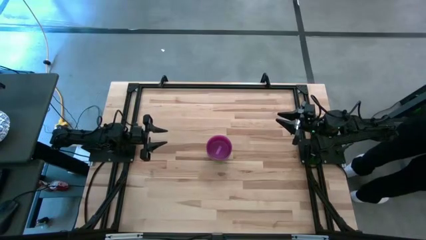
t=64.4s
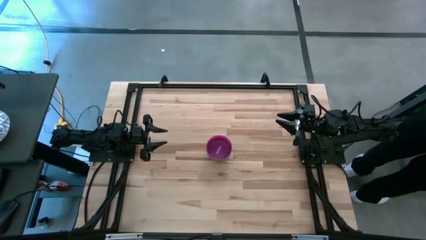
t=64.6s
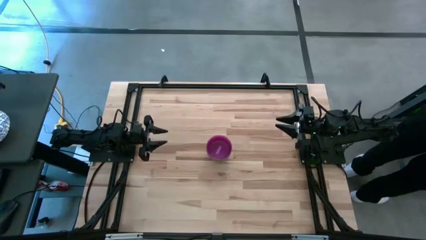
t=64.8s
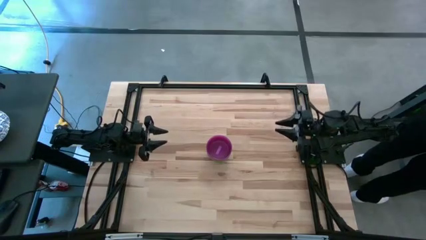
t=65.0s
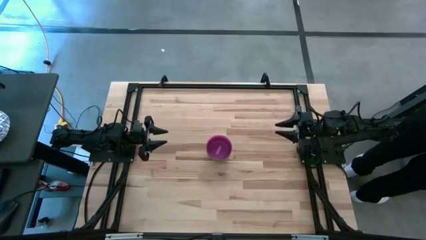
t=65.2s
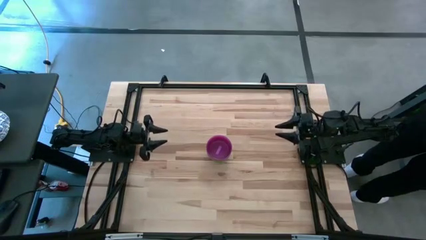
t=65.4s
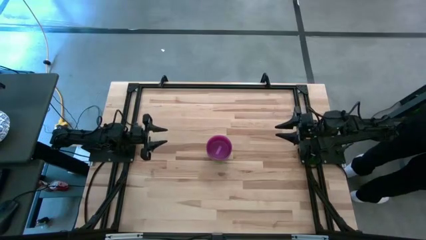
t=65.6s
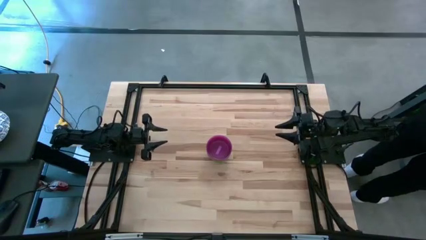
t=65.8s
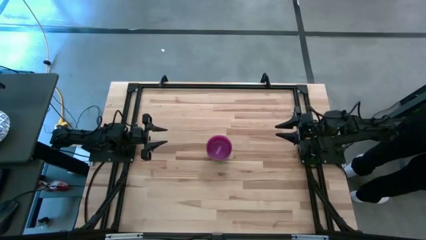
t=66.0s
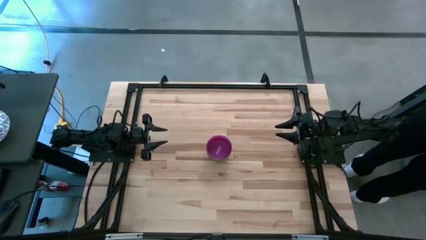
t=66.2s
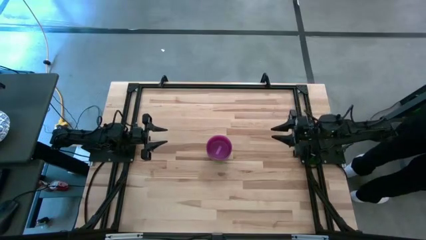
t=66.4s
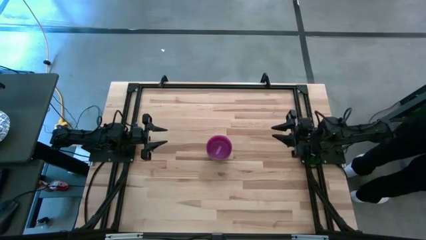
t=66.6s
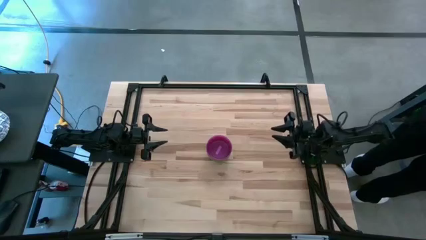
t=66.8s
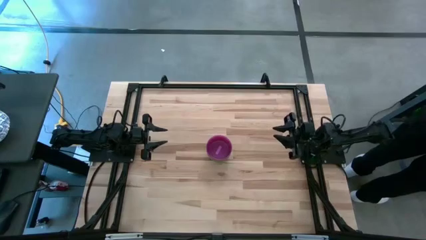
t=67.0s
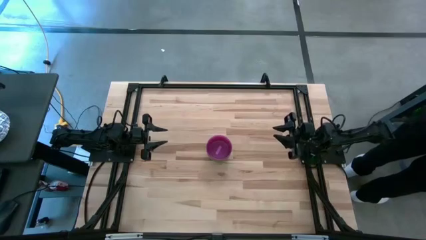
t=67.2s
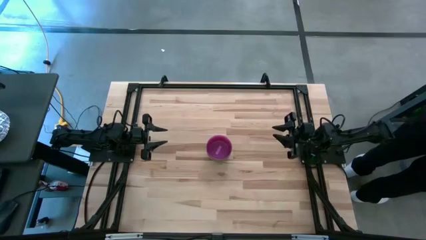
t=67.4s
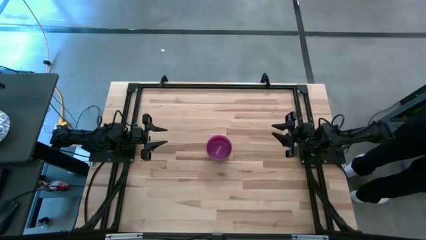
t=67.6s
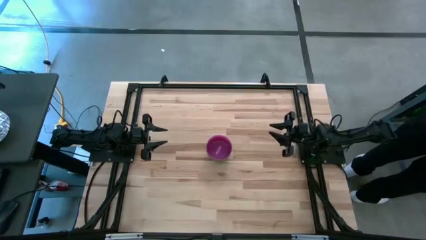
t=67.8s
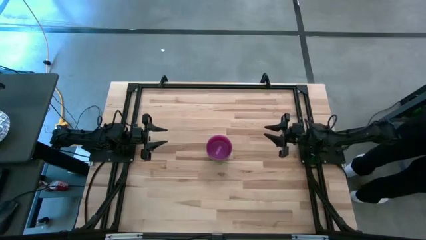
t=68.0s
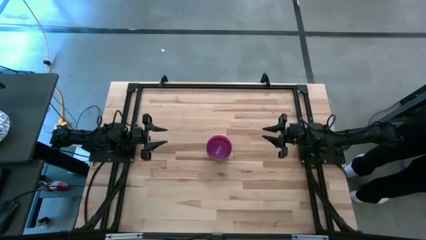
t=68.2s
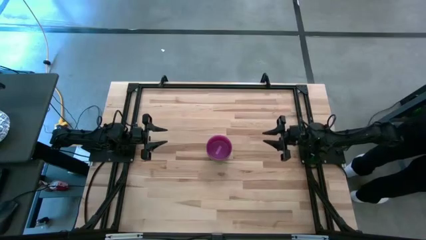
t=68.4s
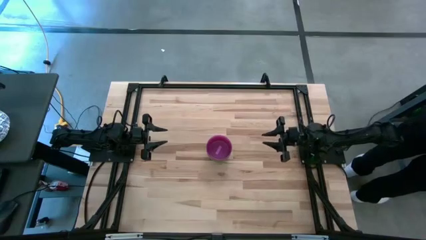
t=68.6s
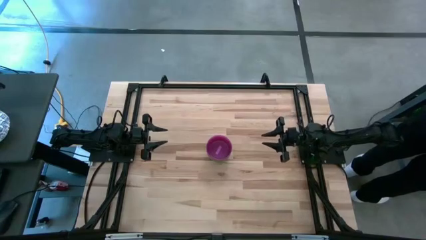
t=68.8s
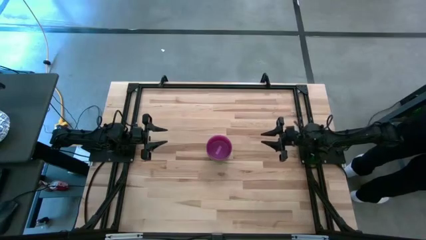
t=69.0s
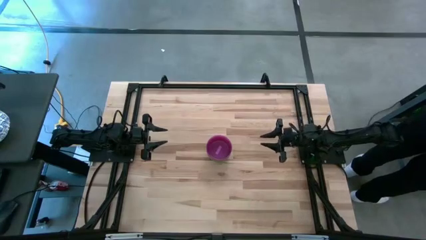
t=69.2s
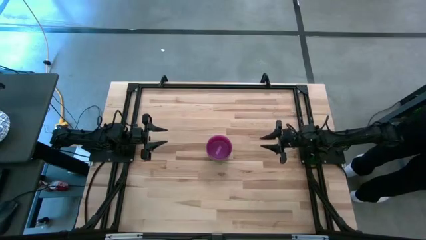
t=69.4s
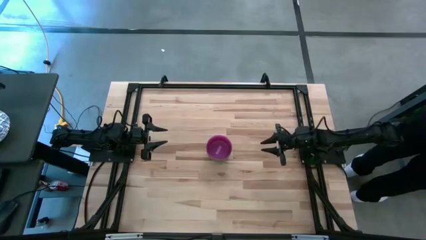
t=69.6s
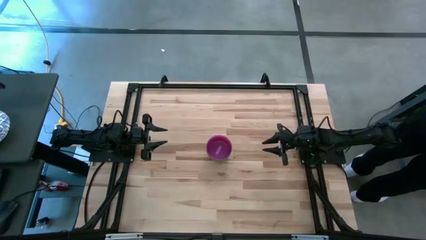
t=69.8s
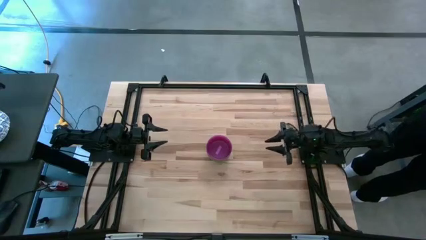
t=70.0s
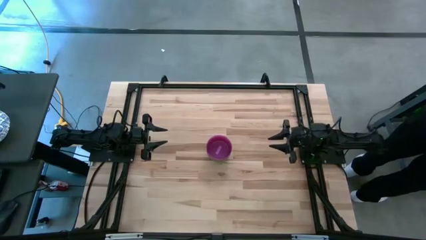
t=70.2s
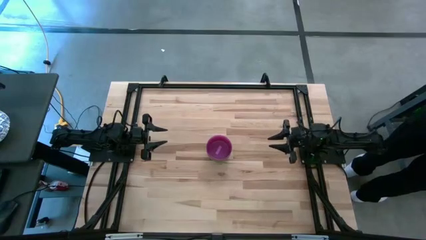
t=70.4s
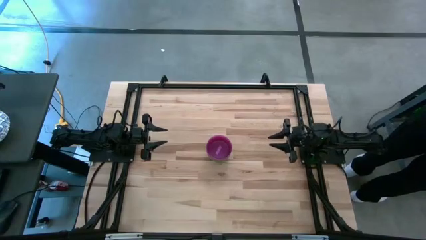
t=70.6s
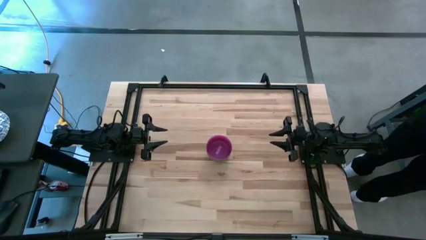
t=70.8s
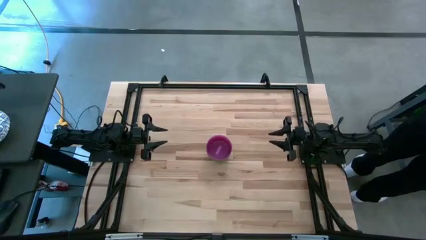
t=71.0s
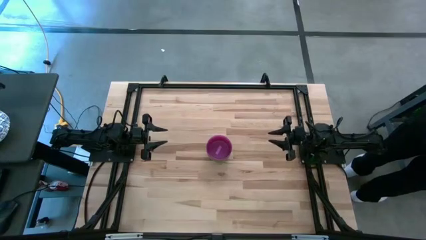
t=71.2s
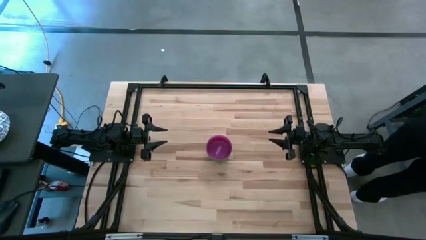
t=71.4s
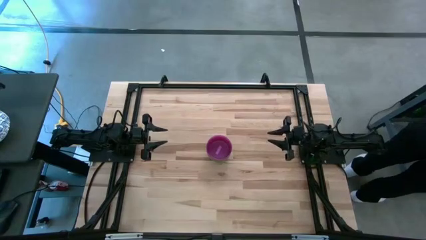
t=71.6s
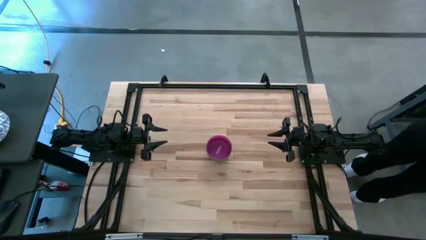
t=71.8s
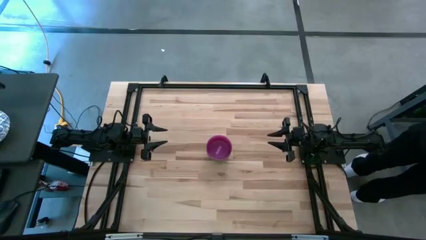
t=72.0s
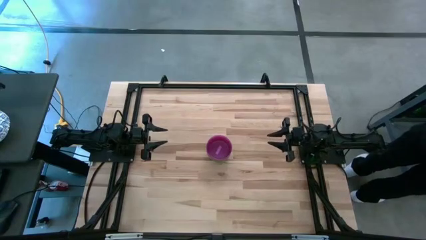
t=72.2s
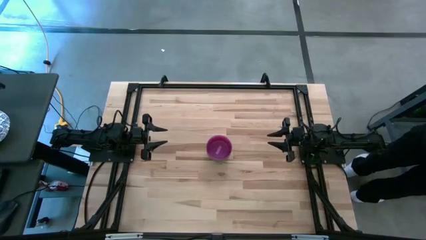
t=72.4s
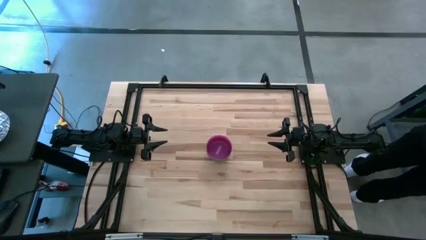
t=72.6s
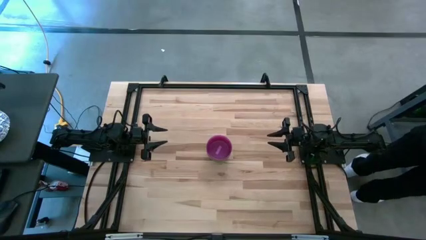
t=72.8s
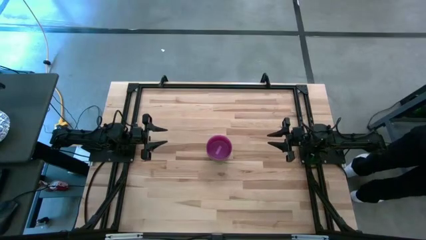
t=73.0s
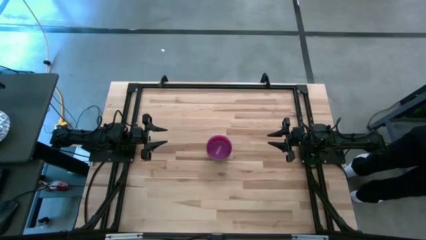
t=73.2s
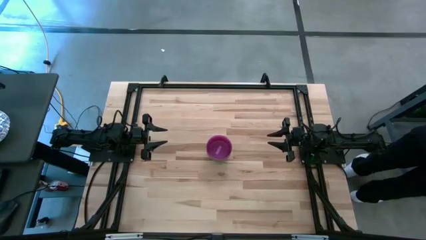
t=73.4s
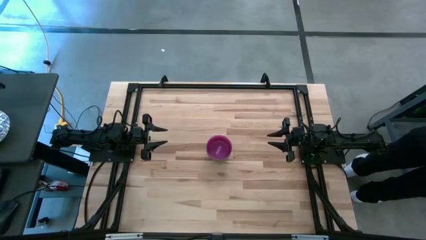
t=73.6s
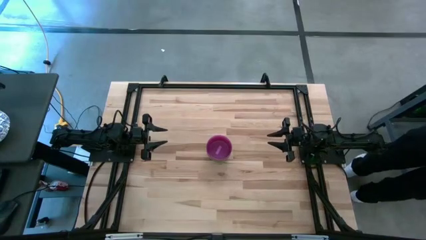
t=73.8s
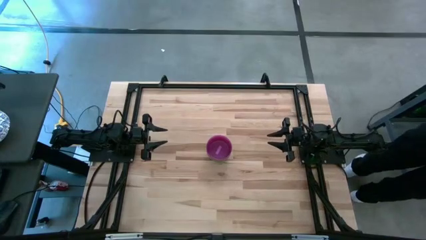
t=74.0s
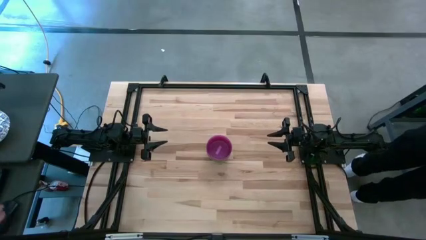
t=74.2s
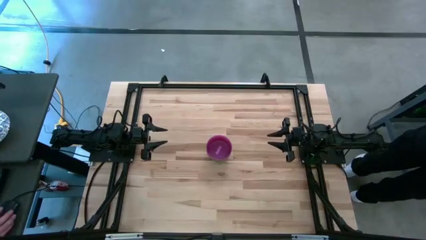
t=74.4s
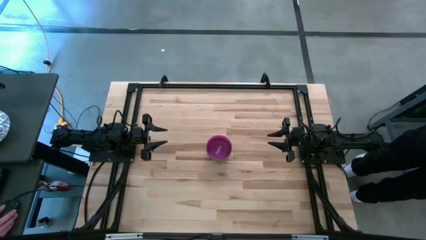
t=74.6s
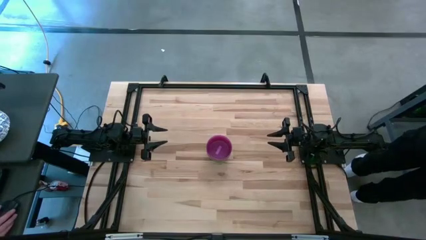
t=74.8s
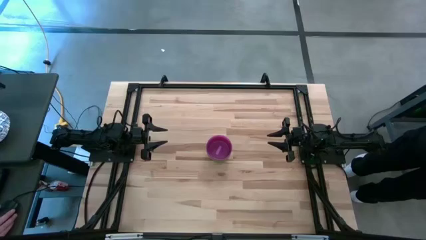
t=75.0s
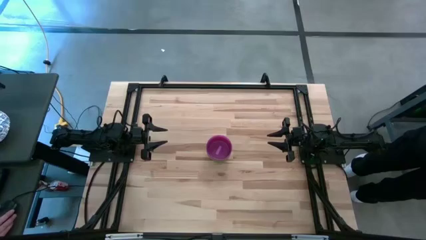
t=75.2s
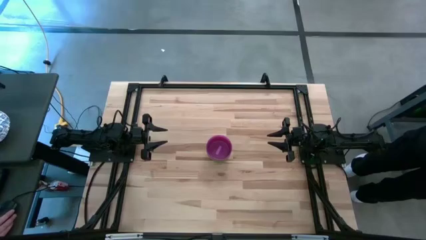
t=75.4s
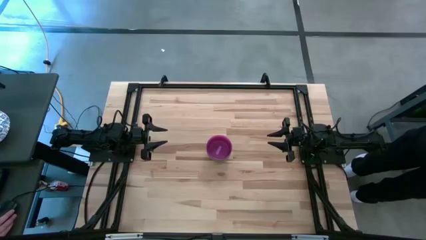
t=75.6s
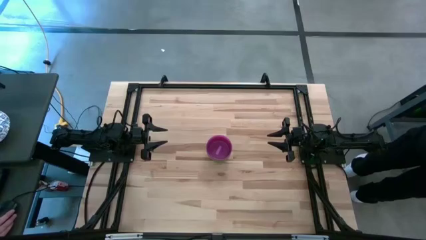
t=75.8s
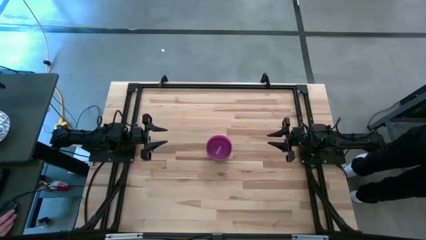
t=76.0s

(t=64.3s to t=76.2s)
Task: Nest bowls inside each other
Return to Home Position

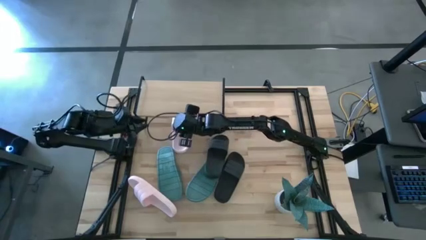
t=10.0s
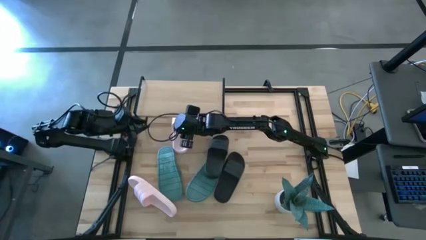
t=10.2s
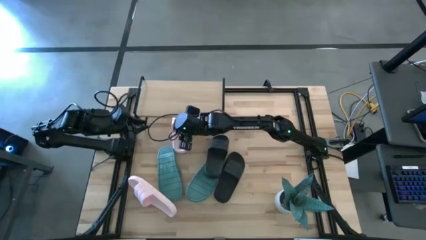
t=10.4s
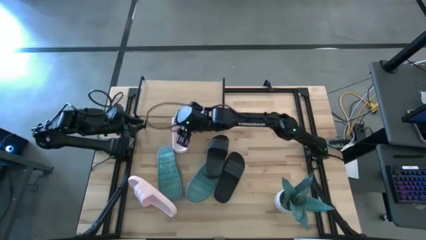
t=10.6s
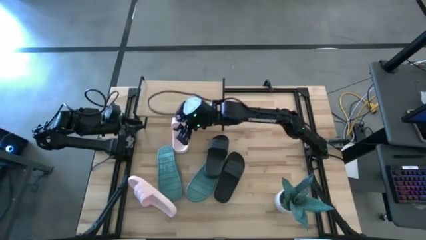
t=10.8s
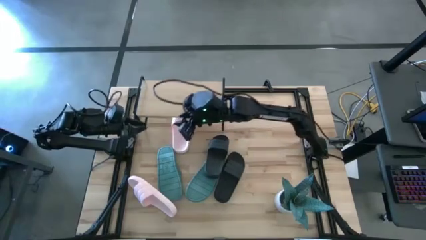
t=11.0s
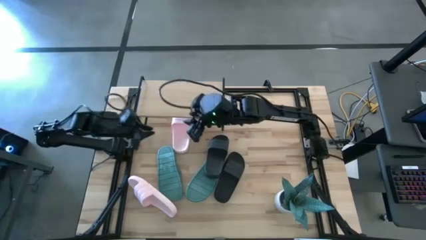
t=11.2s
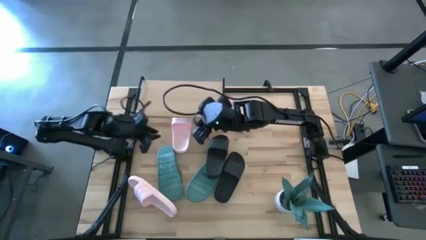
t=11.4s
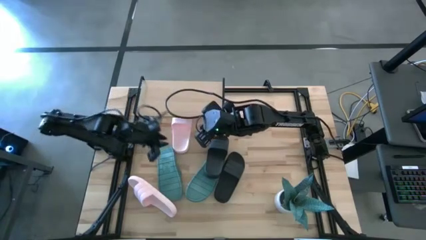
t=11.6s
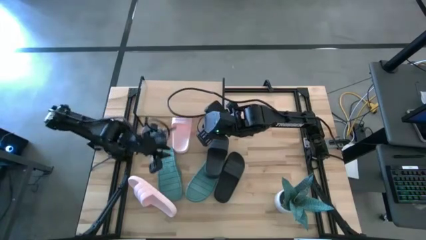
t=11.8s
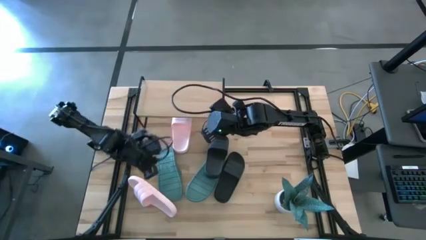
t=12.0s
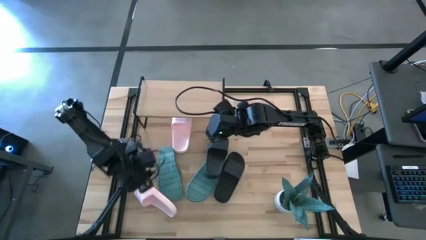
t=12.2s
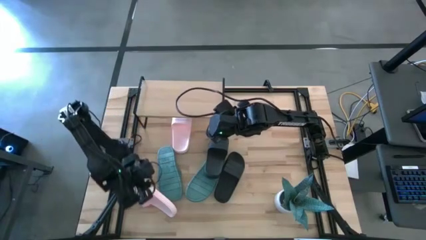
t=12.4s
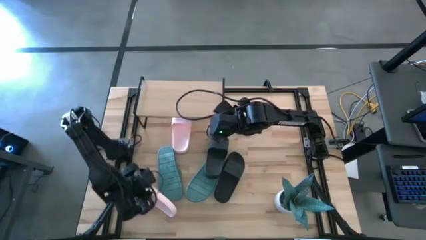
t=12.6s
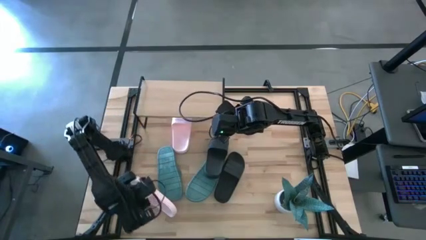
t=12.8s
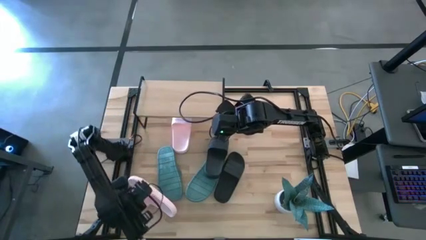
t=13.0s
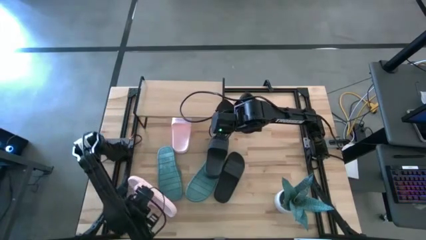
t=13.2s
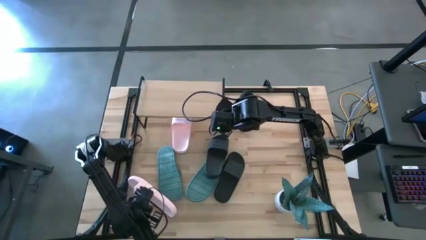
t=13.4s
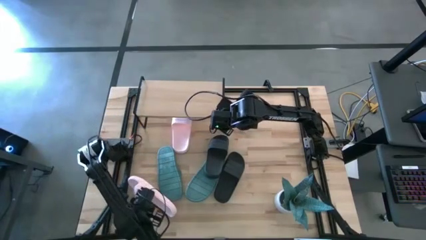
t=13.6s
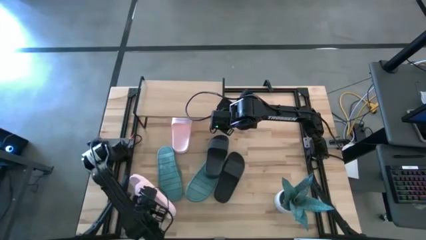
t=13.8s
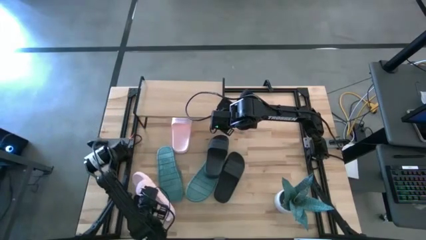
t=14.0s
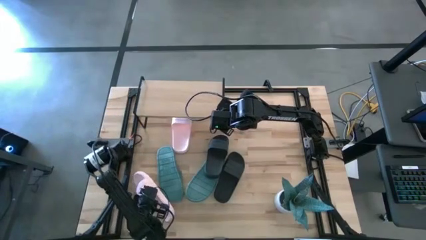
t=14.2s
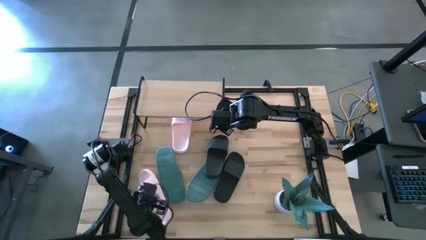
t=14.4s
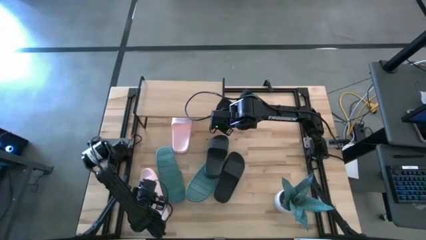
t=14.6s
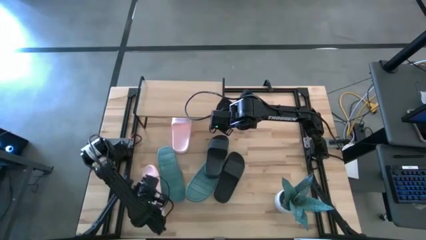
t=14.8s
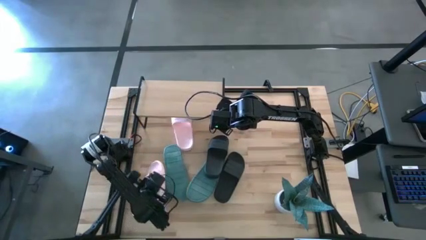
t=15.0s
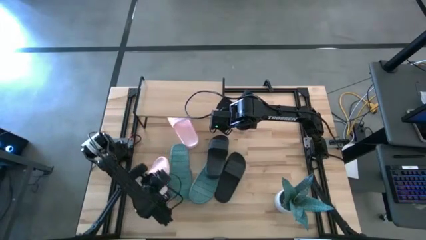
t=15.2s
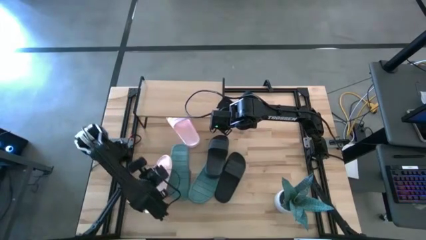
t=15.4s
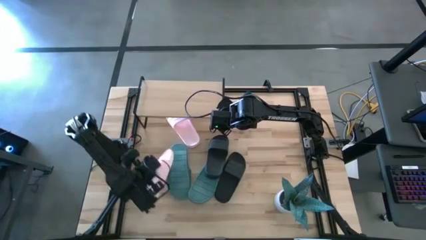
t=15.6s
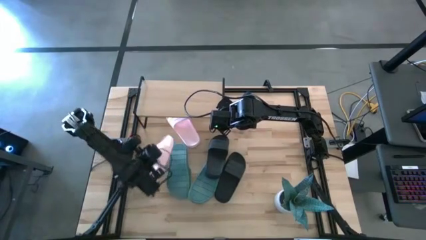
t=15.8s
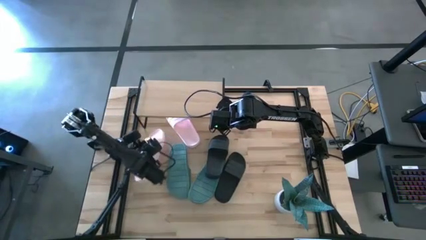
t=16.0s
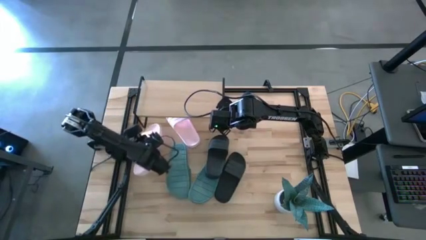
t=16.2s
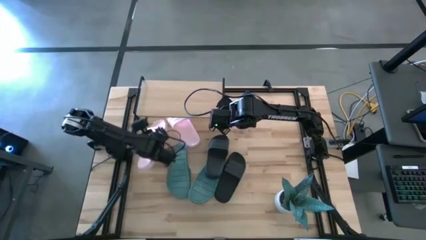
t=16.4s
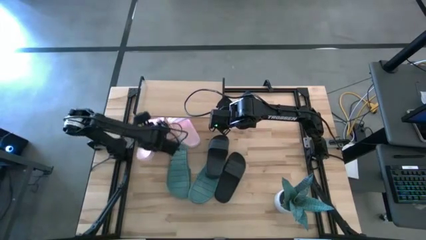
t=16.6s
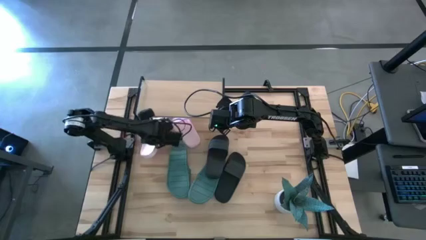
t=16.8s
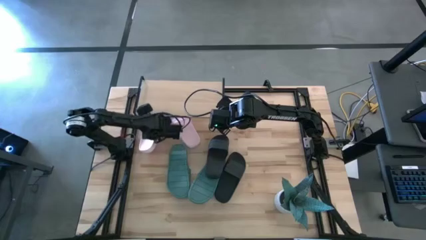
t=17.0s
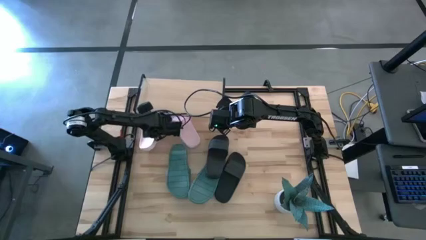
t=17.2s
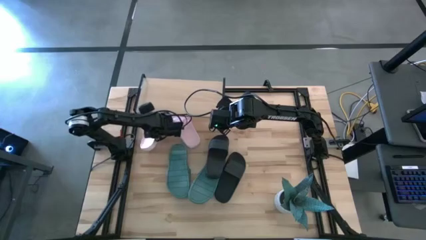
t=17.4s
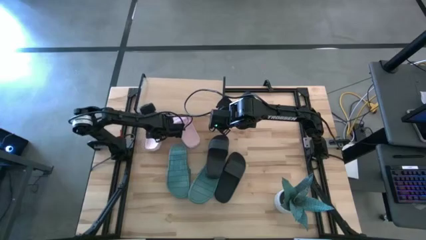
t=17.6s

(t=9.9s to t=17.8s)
Task: Pick and place slides into the shelf
Put the pink slide under the shelf
